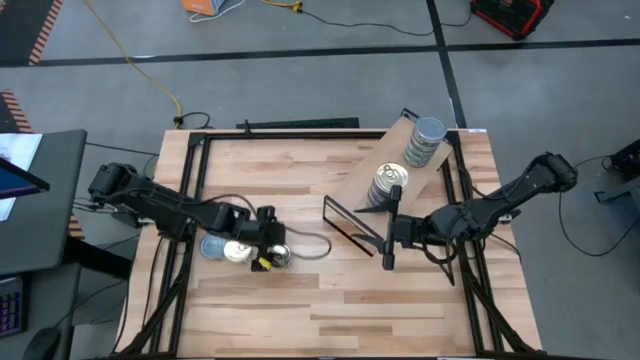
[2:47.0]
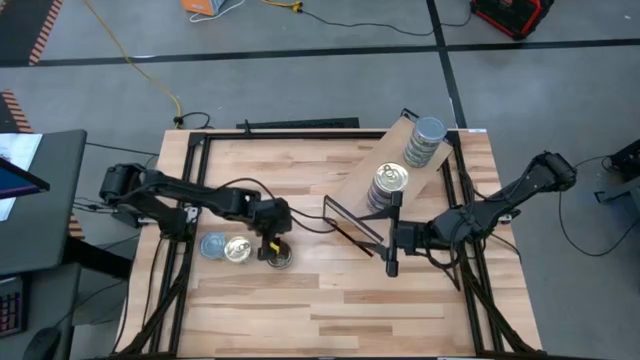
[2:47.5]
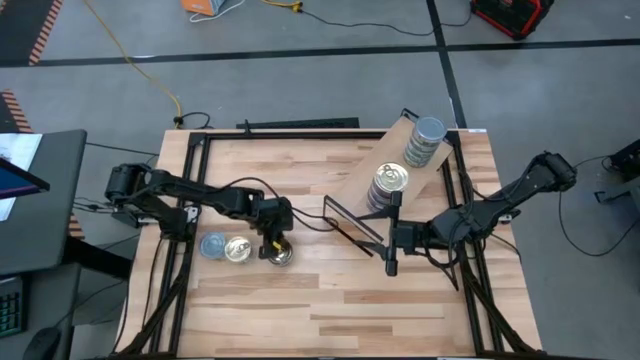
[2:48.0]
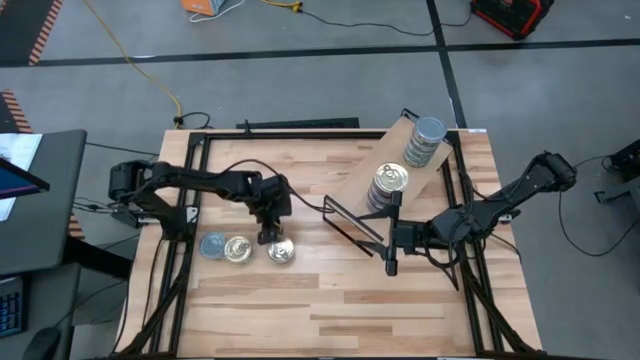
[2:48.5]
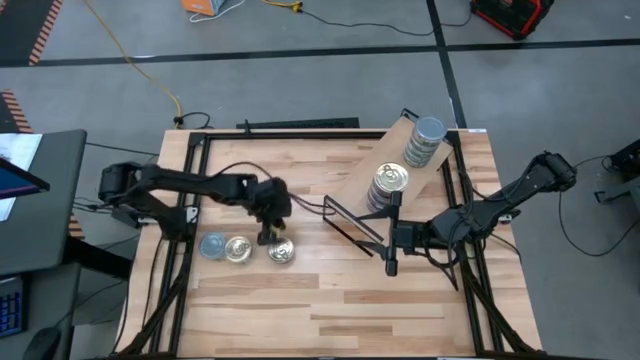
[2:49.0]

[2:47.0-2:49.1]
Task: Stack canned seafood by type on shelf
Stack the blue and pink tuna can on the shelf

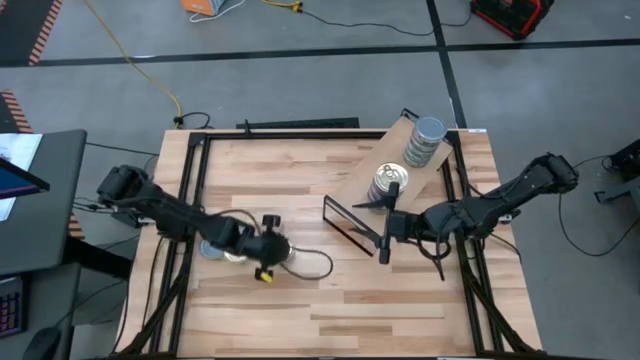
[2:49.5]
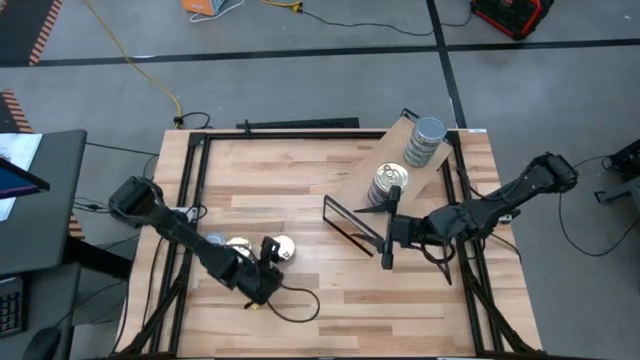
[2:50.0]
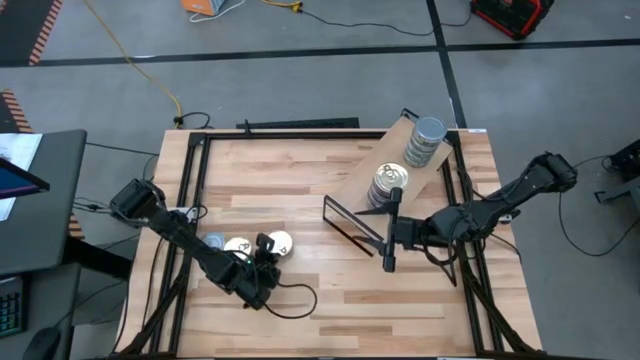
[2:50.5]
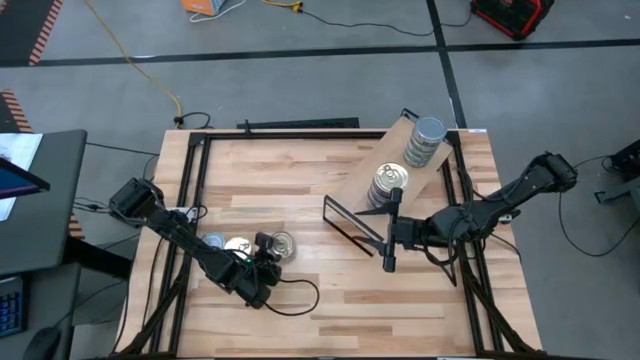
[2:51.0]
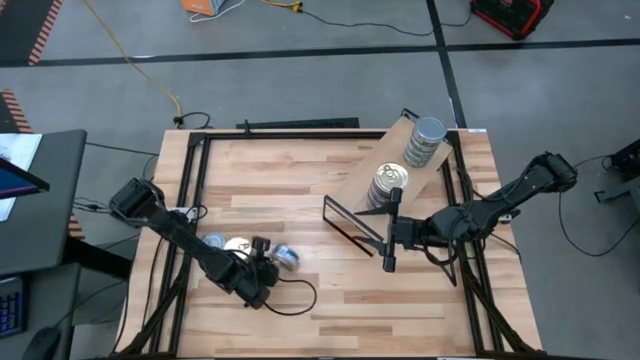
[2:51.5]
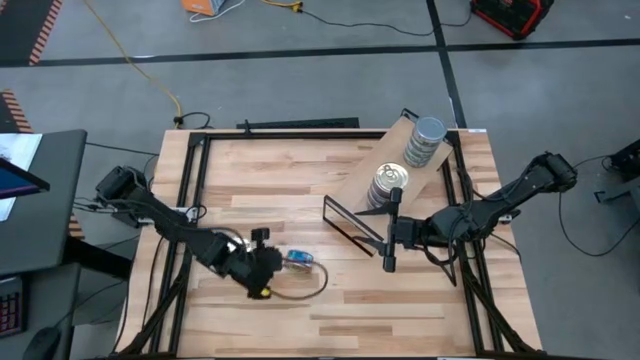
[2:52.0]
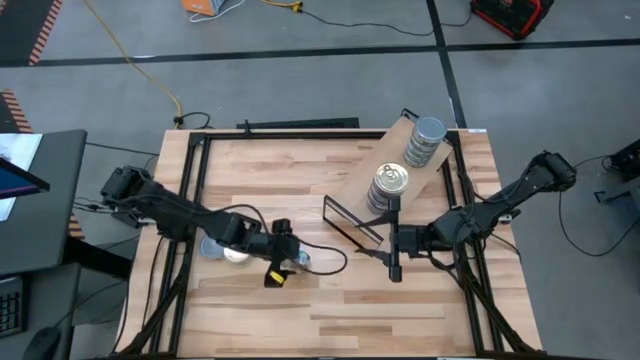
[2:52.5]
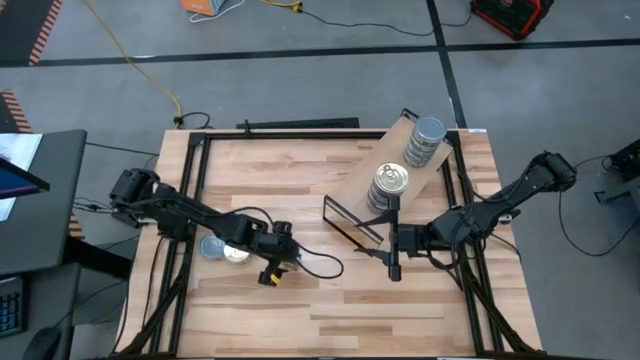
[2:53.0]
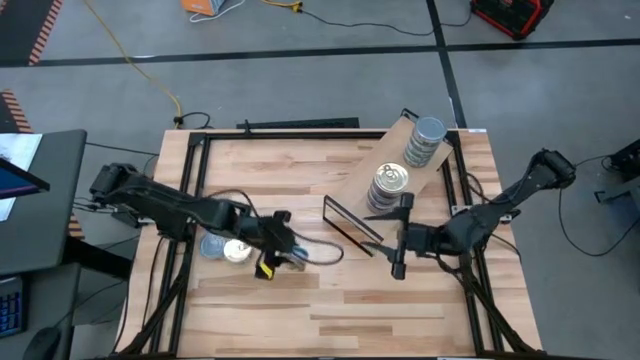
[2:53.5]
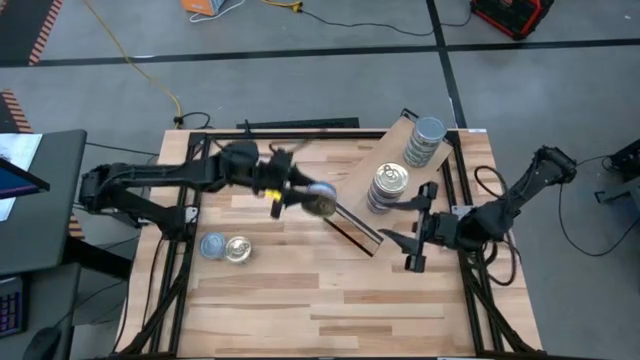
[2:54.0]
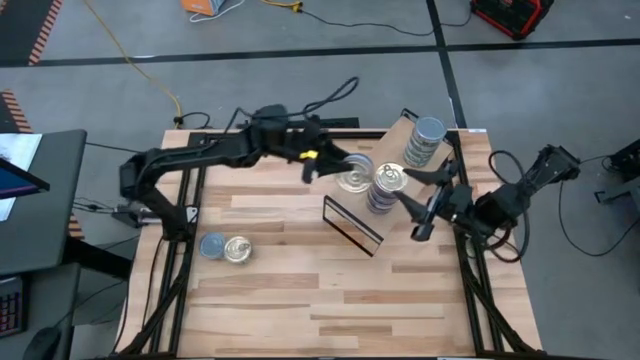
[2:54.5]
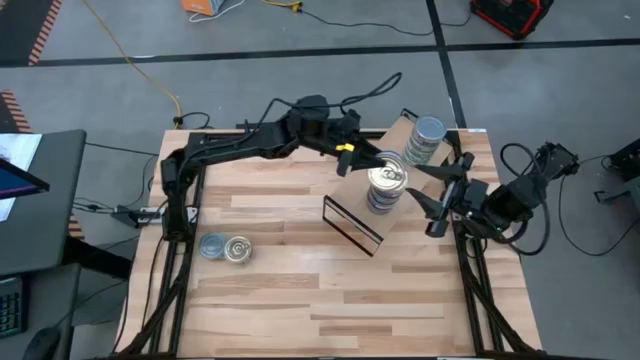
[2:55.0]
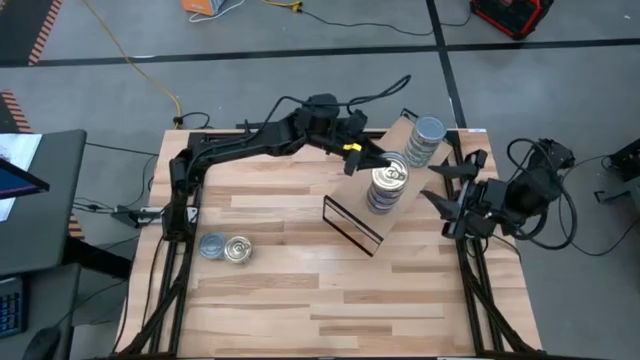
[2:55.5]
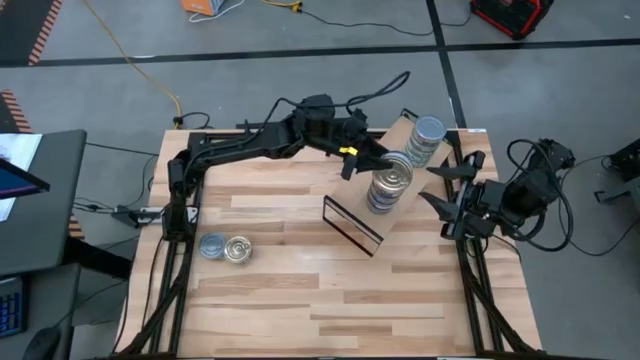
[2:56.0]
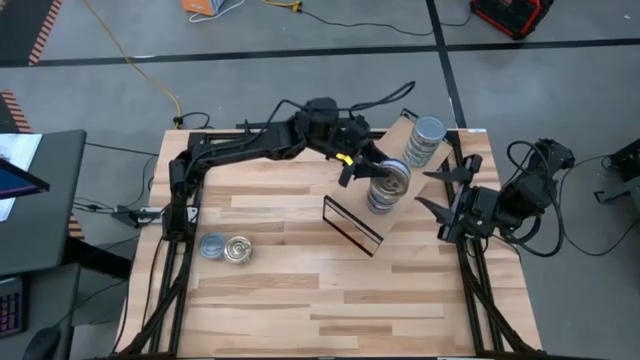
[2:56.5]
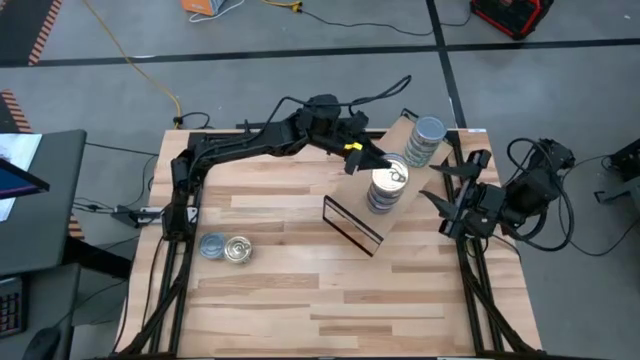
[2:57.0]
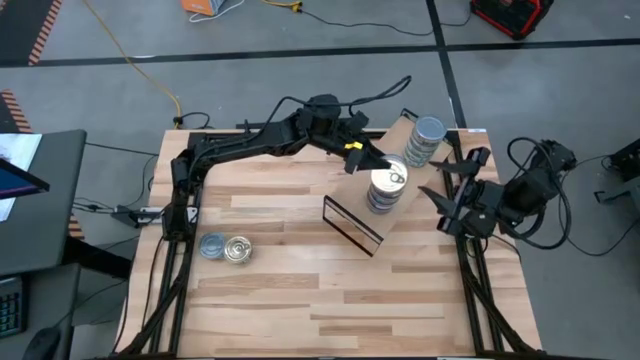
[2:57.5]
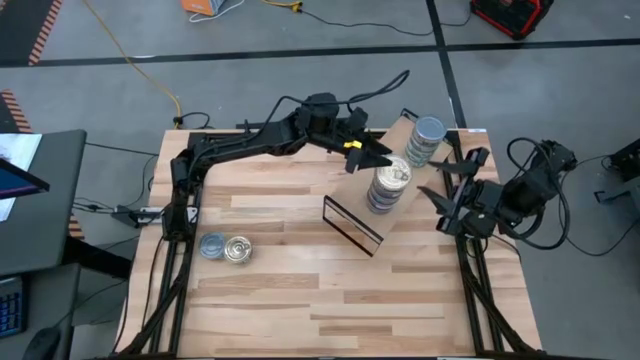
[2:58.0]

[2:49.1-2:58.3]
Stack the blue and pink tuna can on the shelf

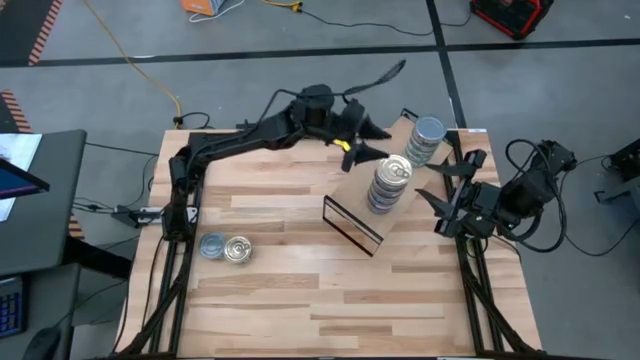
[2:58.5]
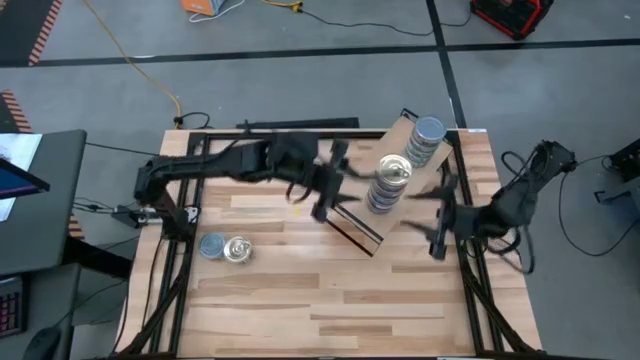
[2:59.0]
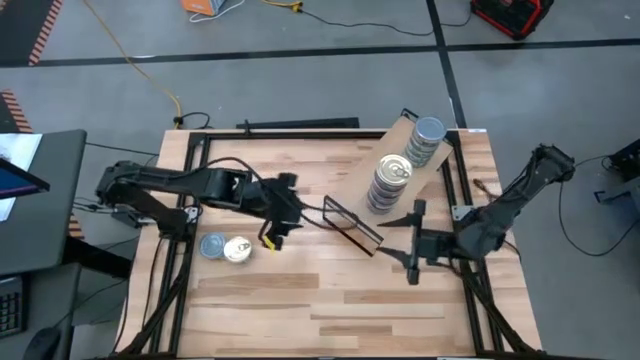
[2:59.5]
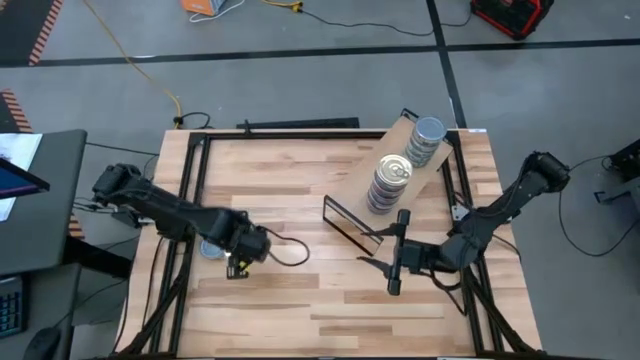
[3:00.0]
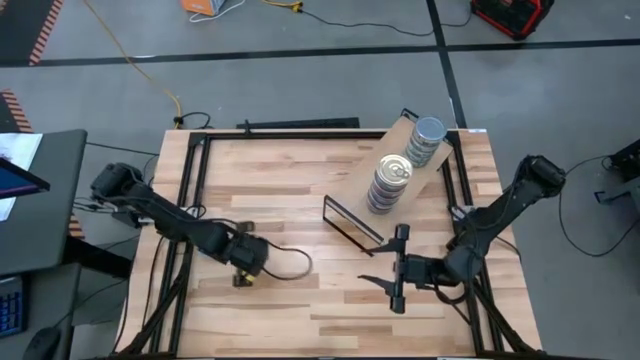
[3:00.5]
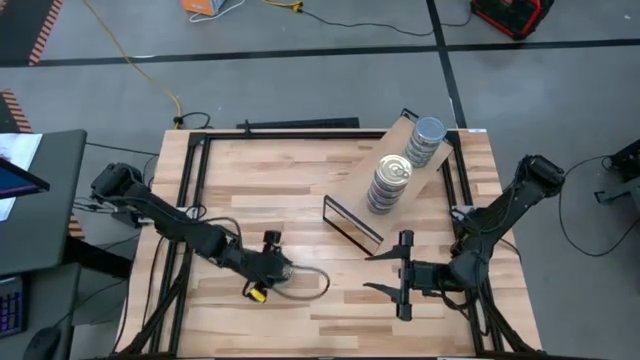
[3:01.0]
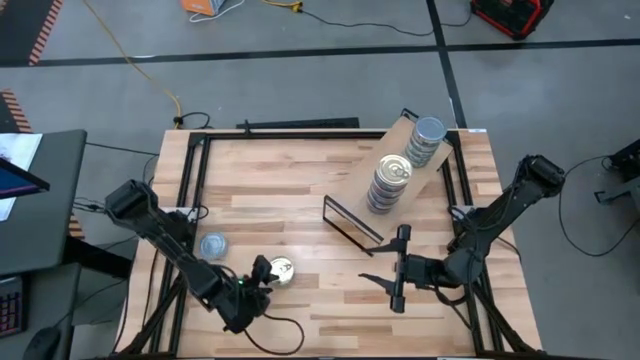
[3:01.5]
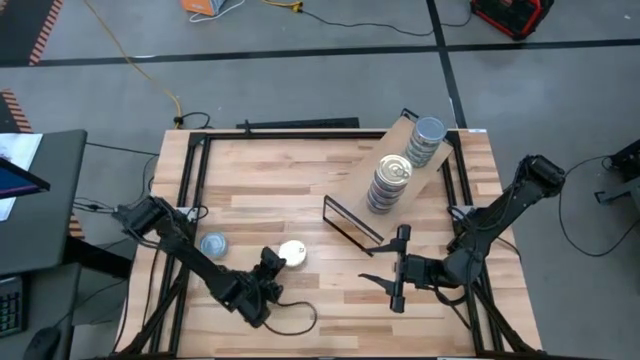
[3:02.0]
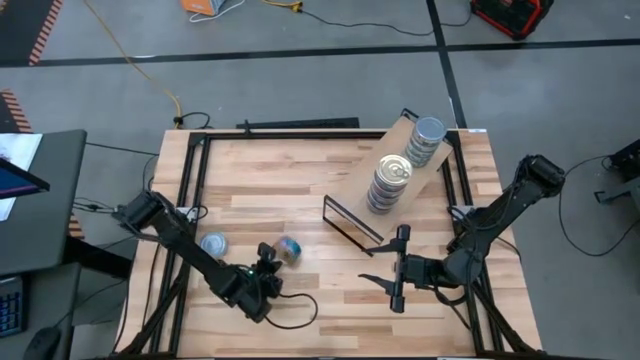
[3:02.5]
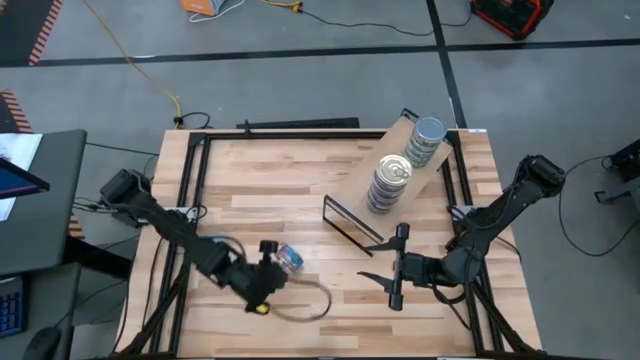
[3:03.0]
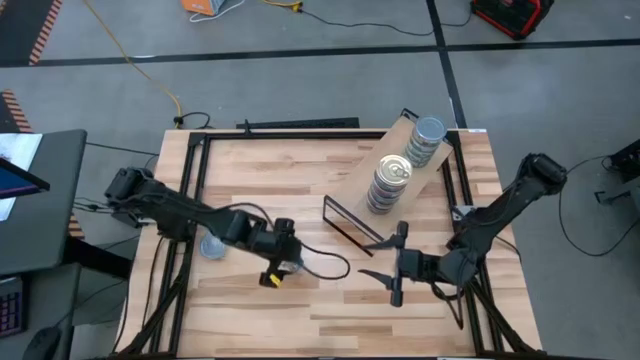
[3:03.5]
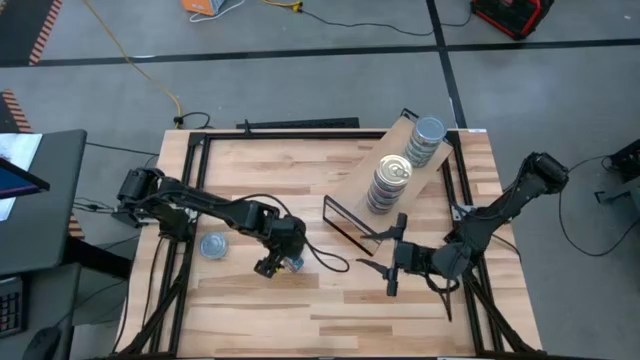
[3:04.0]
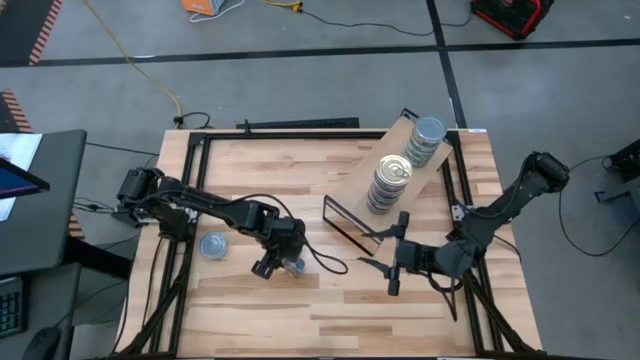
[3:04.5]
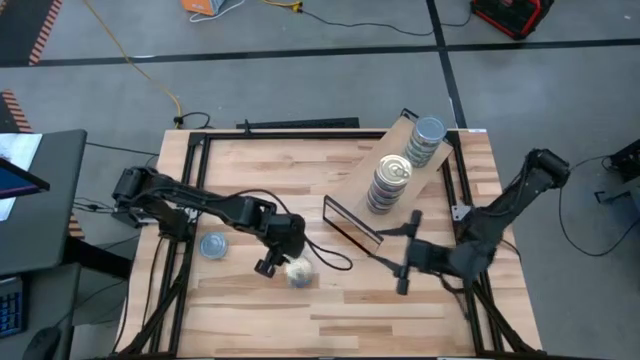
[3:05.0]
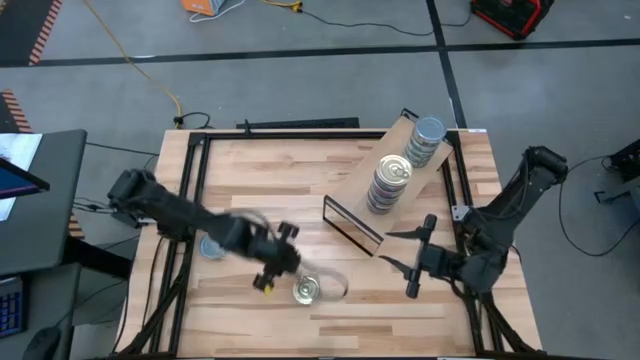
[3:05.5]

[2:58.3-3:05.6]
Stack the blue and pink tuna can on the shelf
